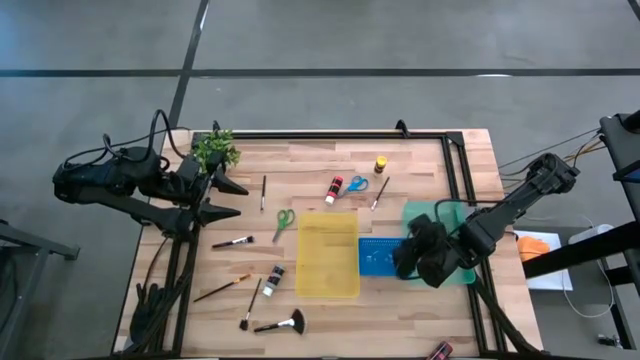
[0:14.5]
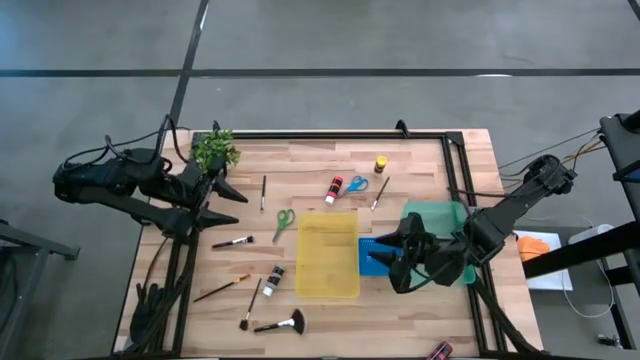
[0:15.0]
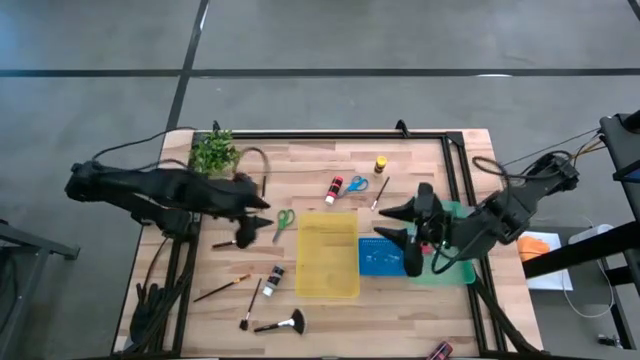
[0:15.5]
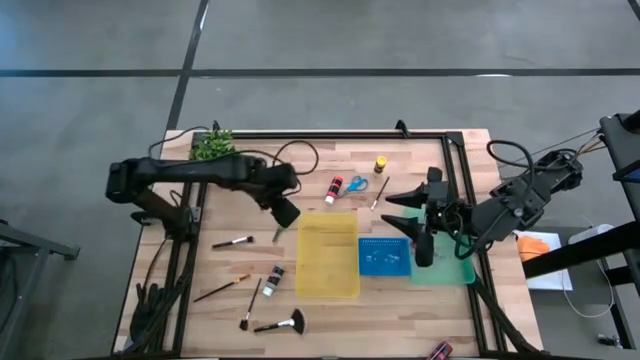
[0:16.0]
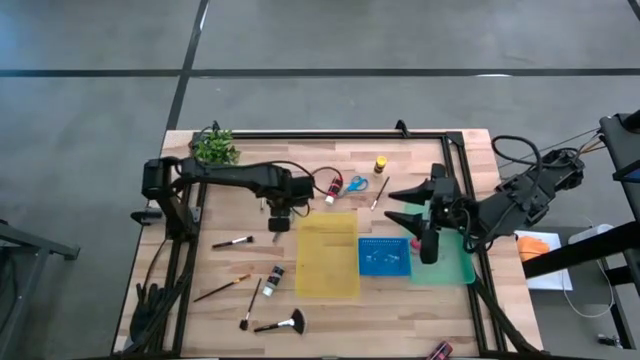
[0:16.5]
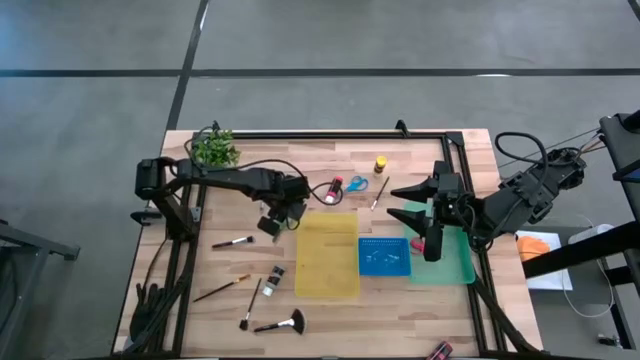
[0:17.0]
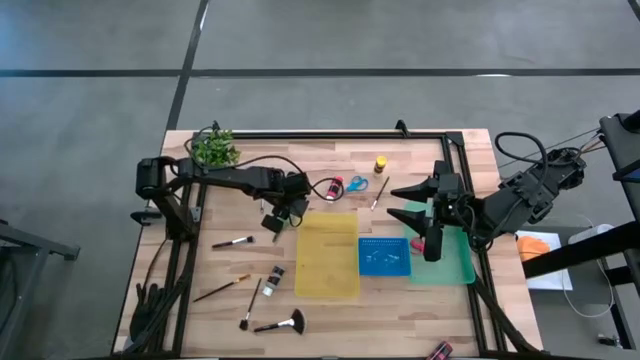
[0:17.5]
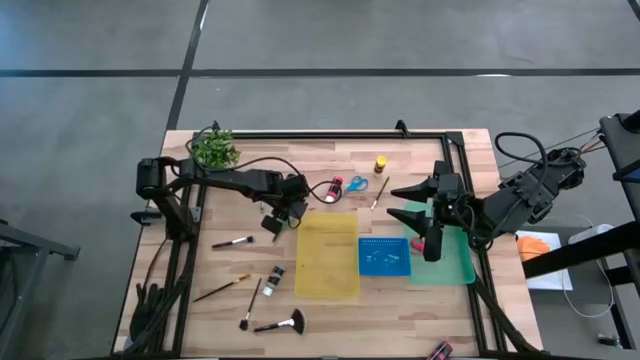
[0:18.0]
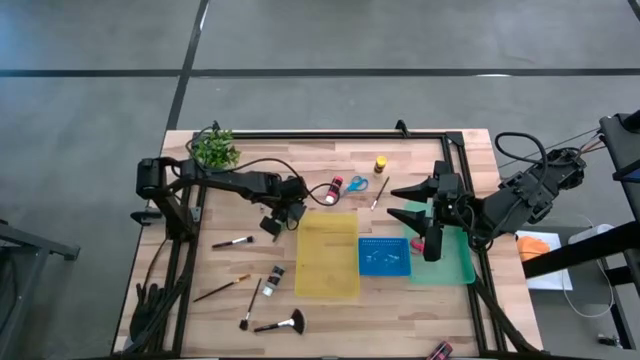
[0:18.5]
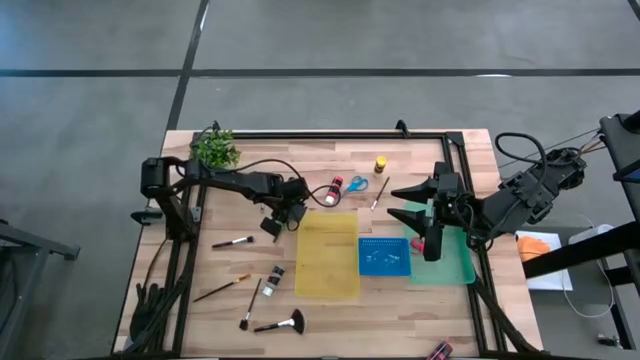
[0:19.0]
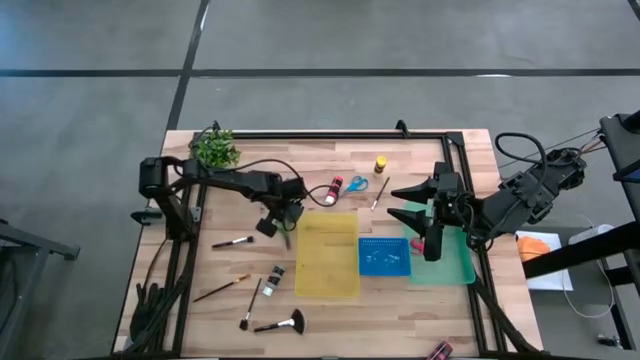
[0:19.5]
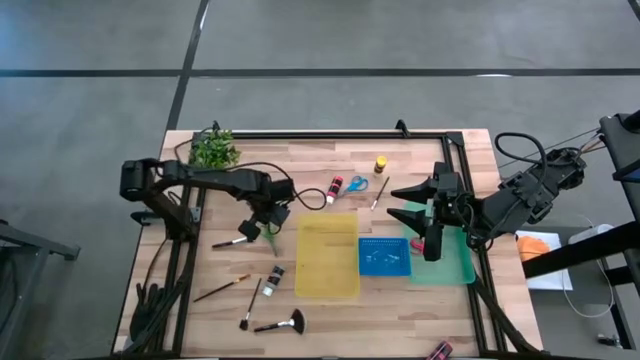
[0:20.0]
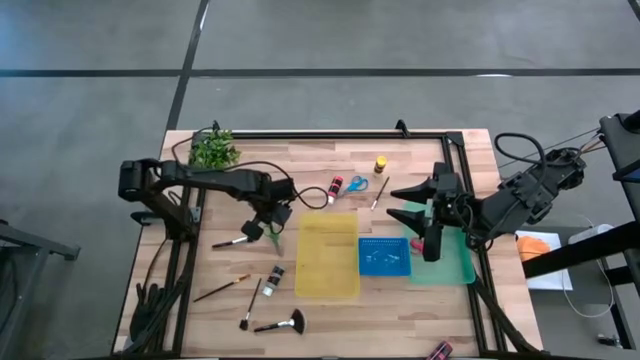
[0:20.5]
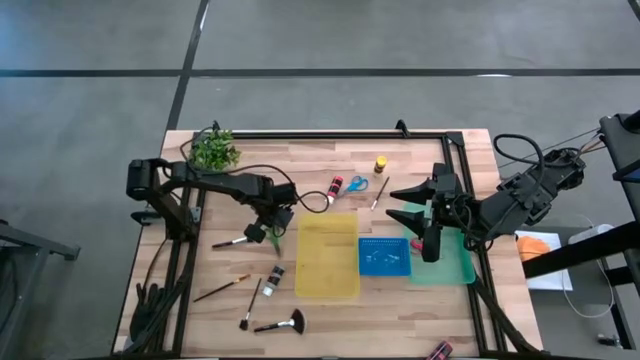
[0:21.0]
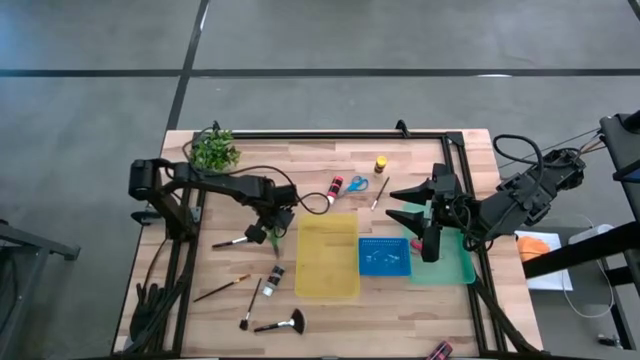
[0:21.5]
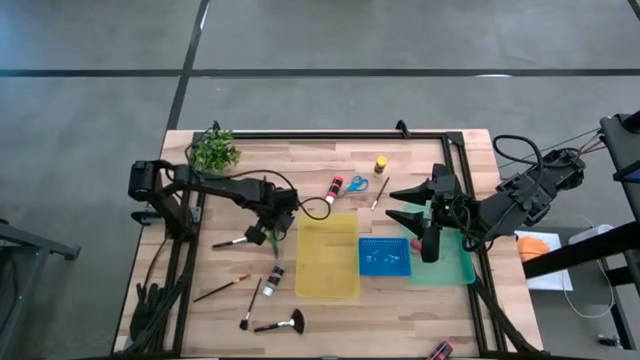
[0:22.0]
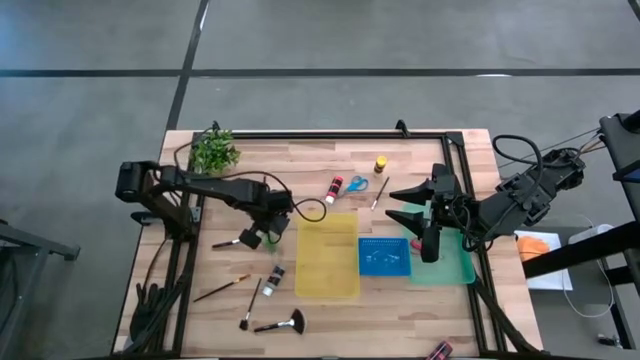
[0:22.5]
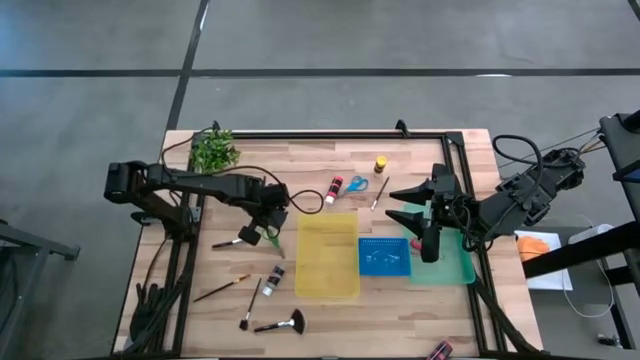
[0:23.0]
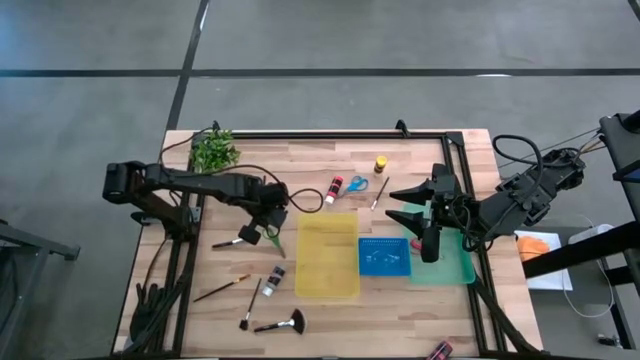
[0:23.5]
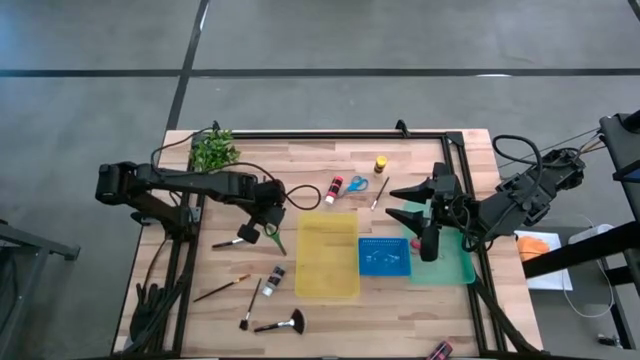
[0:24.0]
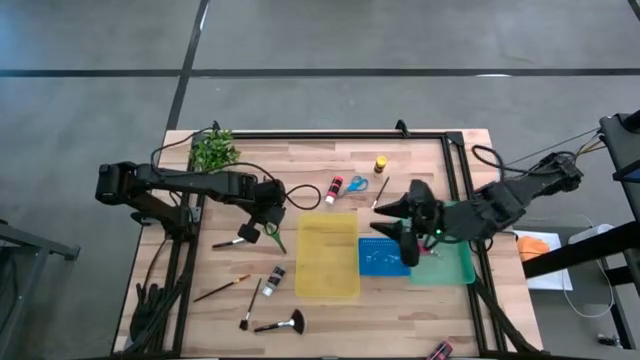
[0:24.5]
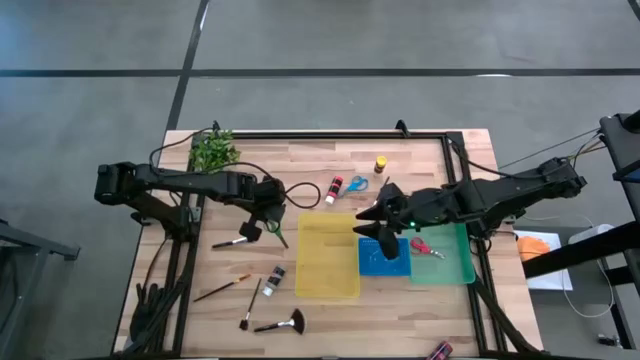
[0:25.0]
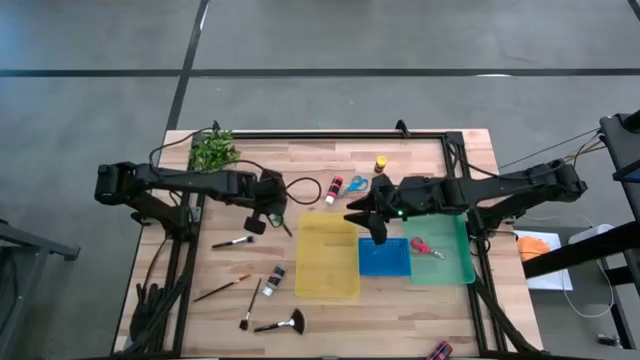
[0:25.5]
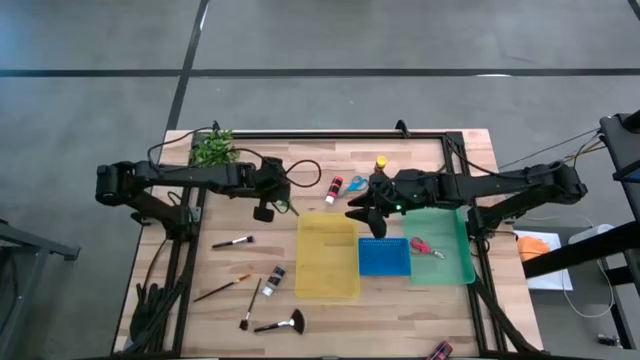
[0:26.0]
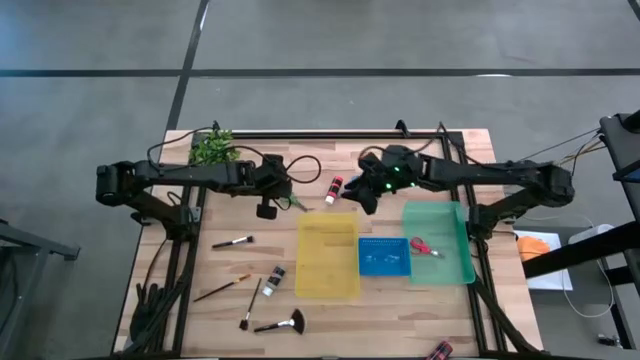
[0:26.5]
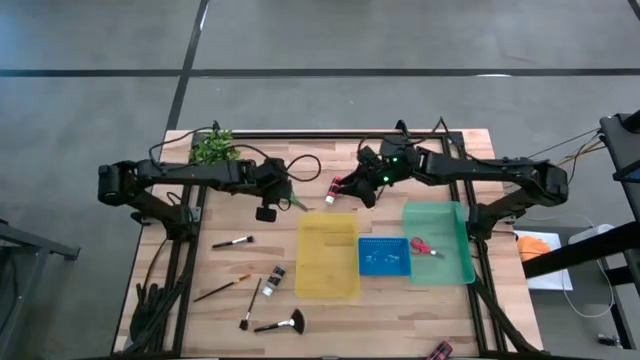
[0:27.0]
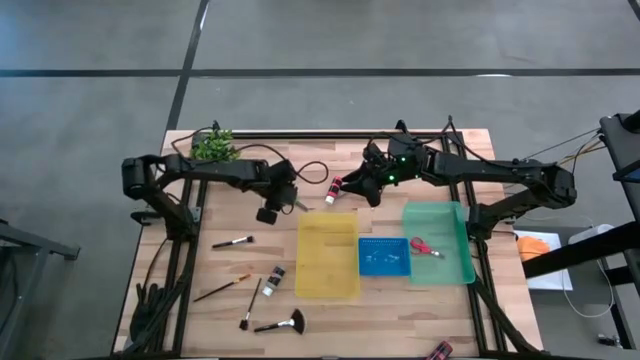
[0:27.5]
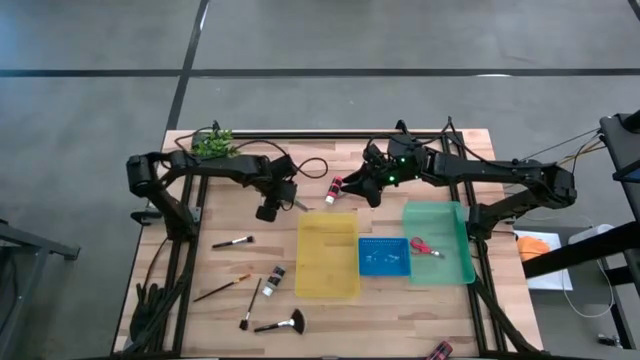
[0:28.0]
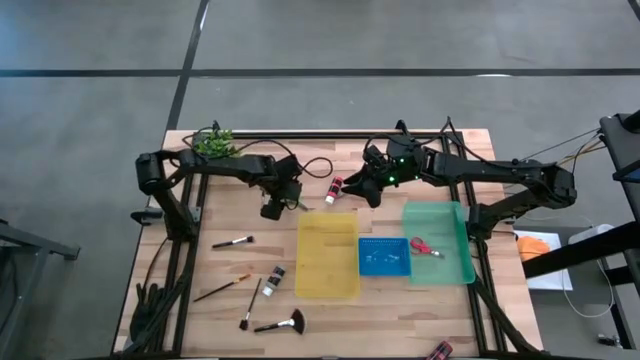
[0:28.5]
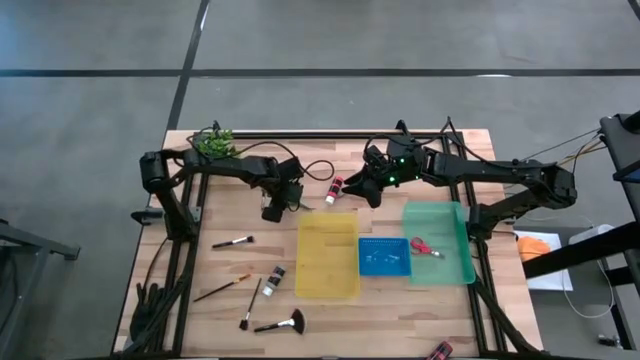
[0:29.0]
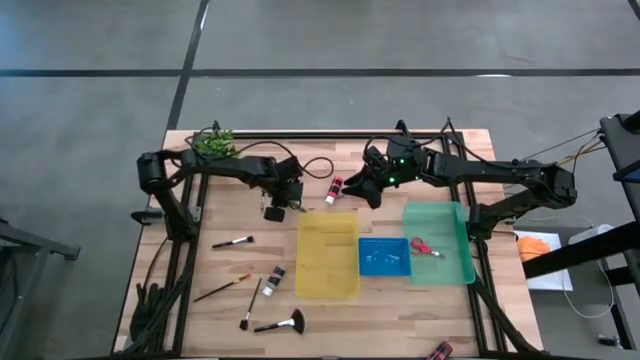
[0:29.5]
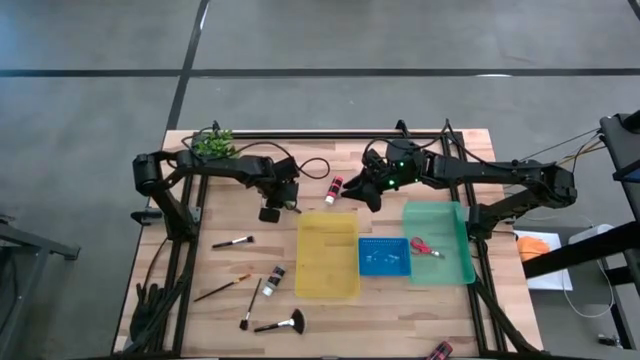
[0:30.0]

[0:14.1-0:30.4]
Task: Pick & Place Paint Supplies
Put the green scissors into the green bin
